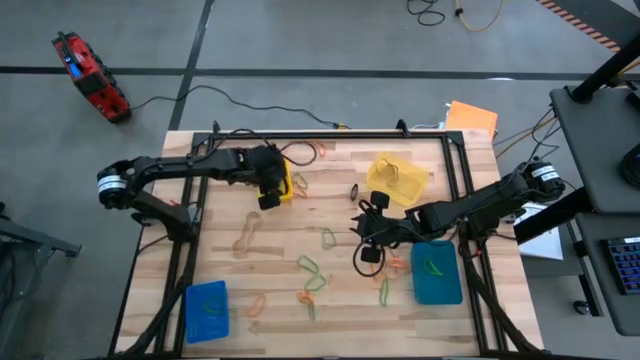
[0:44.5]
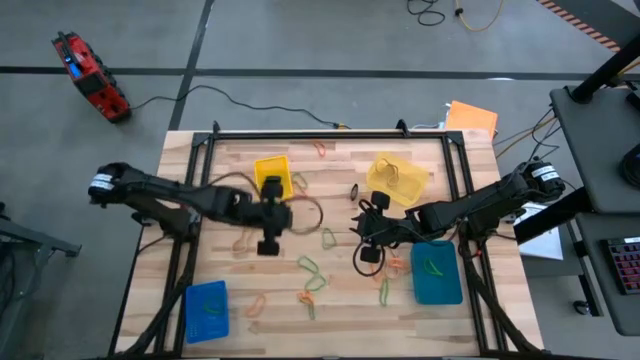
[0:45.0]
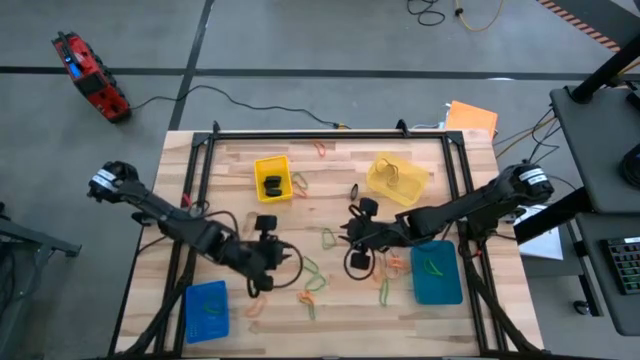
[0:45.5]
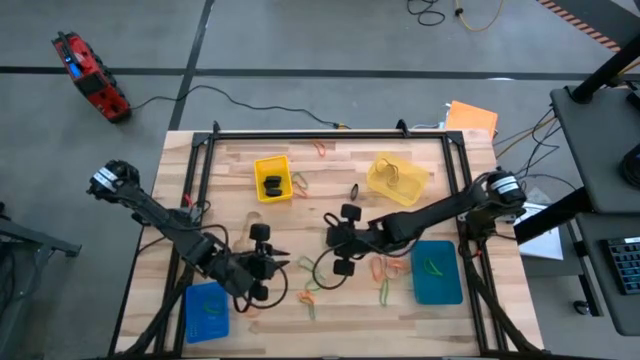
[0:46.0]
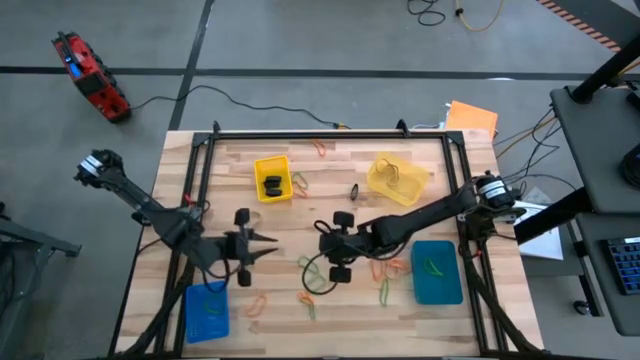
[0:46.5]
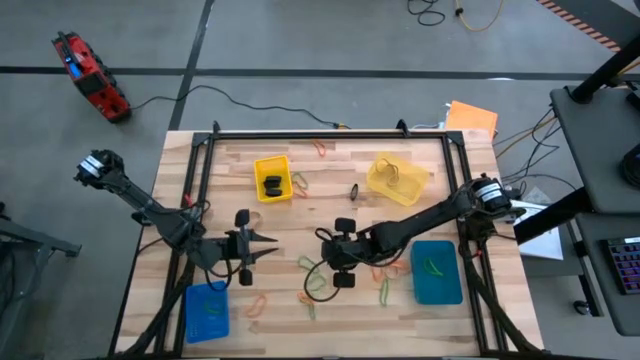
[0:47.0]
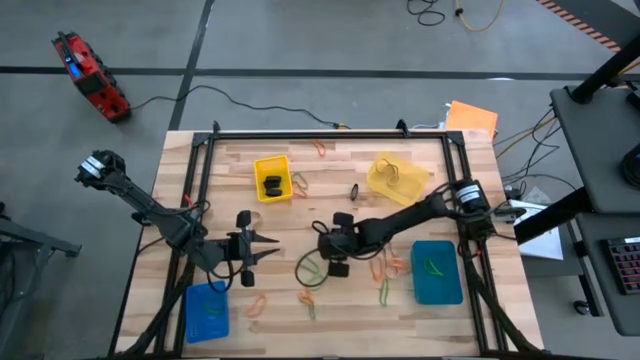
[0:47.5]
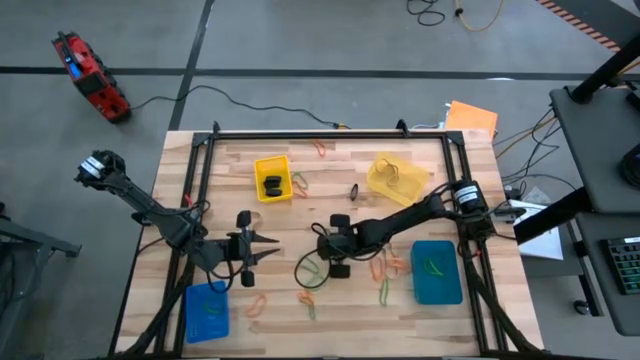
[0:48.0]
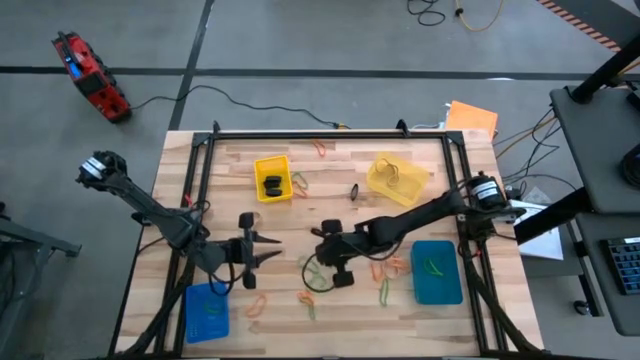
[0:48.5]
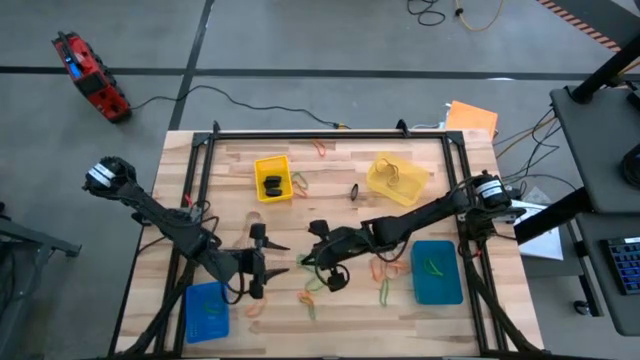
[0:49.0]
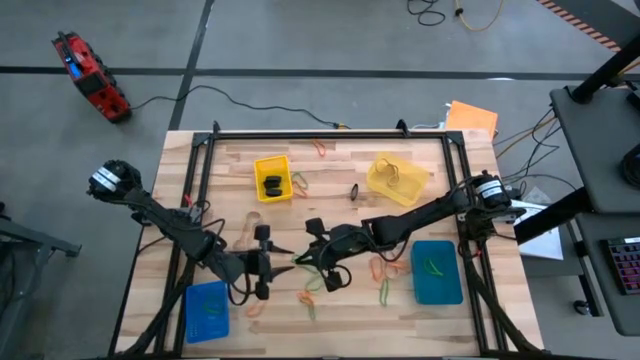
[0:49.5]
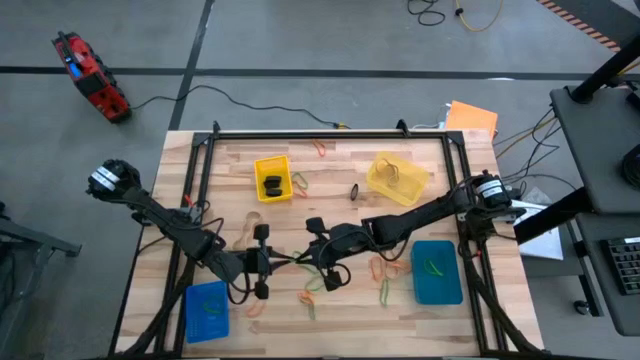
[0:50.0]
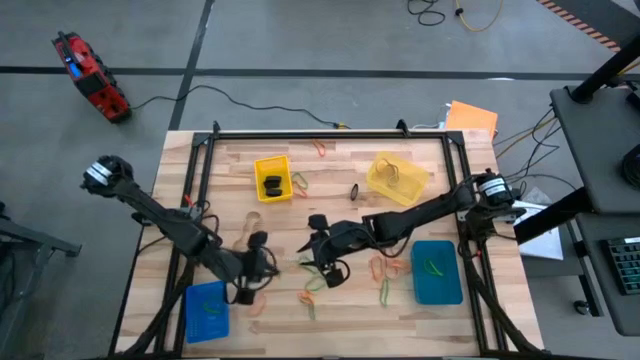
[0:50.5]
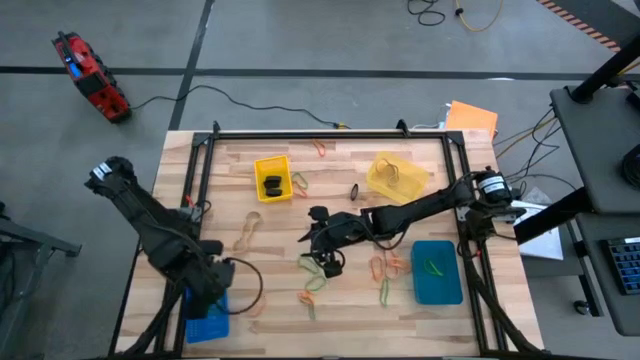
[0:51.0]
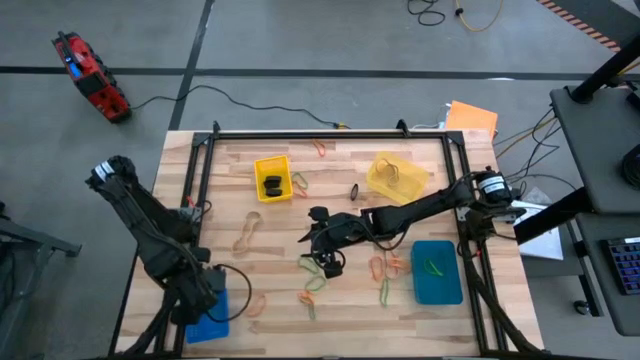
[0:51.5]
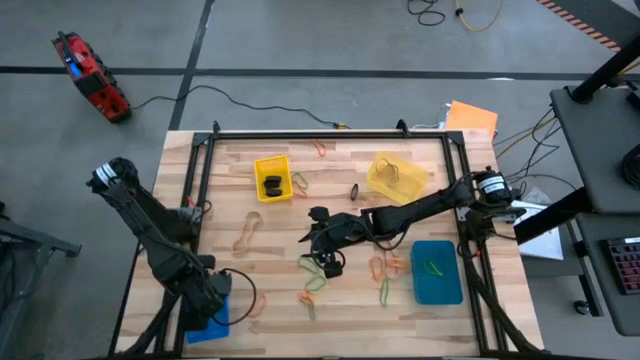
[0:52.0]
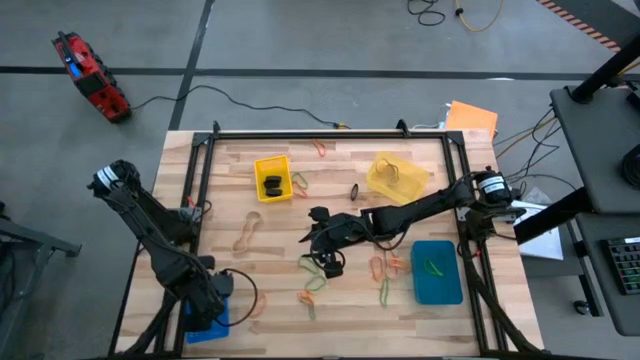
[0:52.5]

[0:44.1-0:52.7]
Task: Sort rubber bands into baskets
Put the green rubber band into the left blue bin

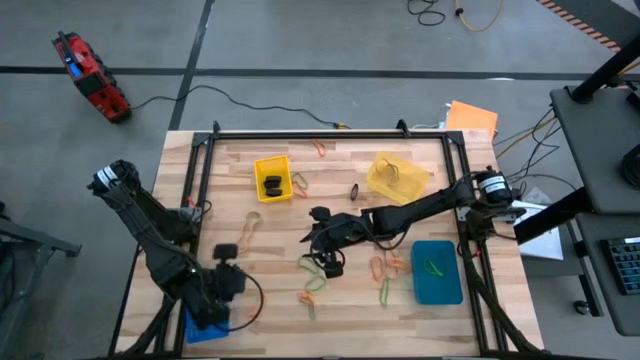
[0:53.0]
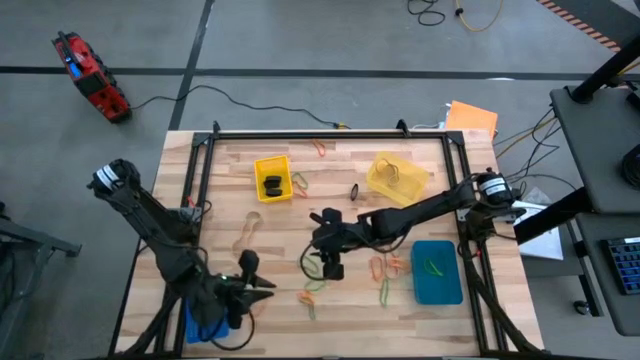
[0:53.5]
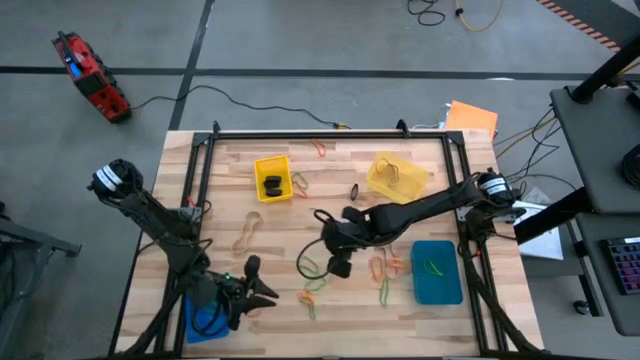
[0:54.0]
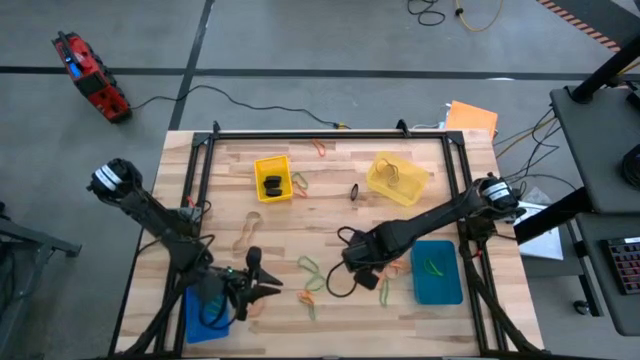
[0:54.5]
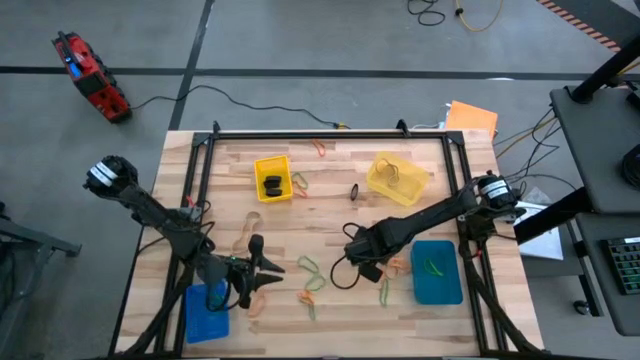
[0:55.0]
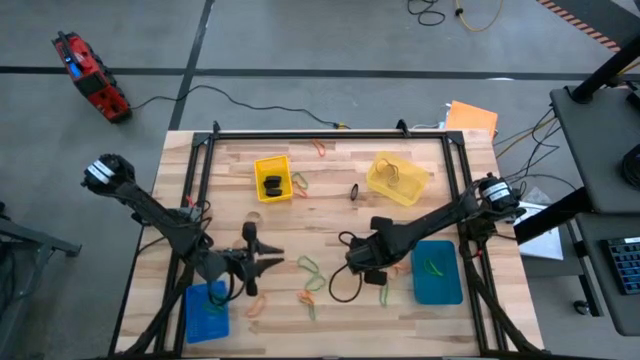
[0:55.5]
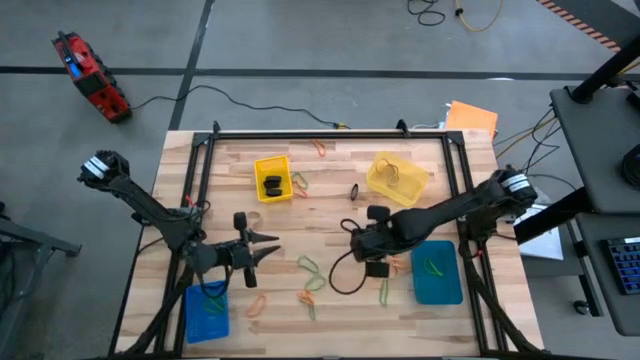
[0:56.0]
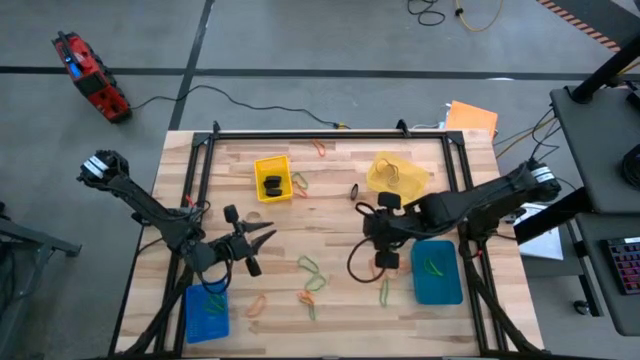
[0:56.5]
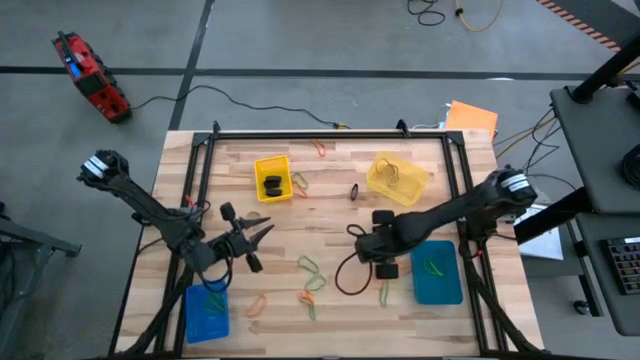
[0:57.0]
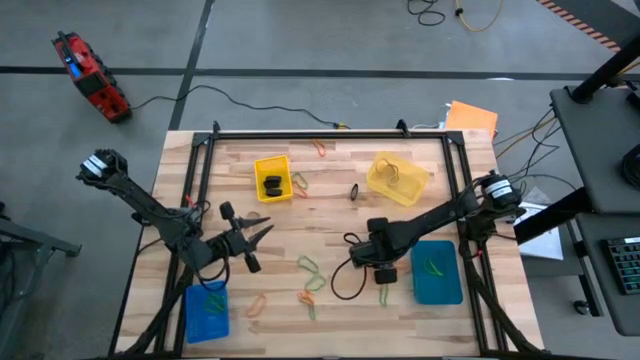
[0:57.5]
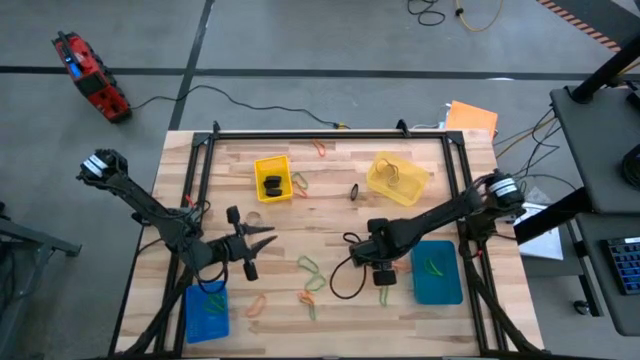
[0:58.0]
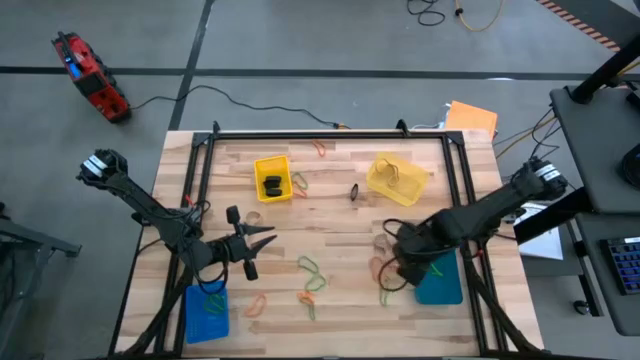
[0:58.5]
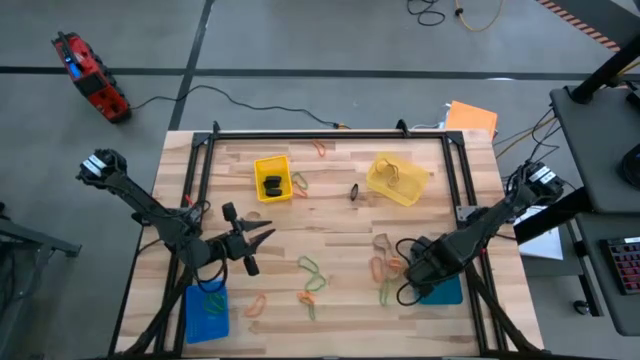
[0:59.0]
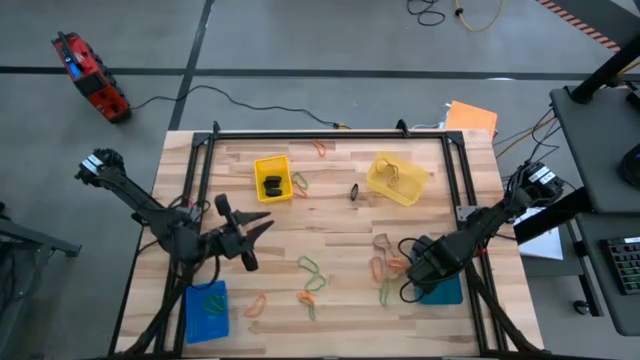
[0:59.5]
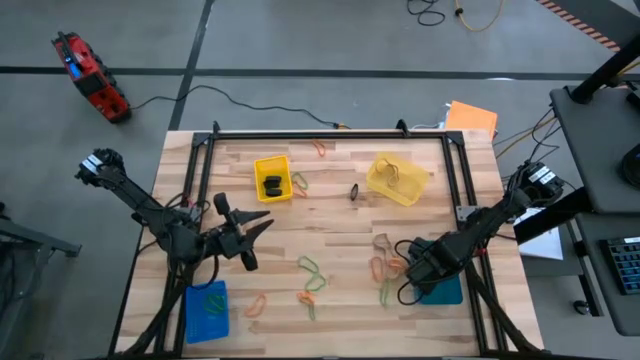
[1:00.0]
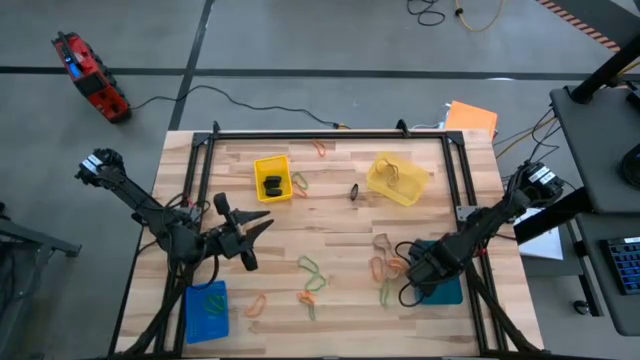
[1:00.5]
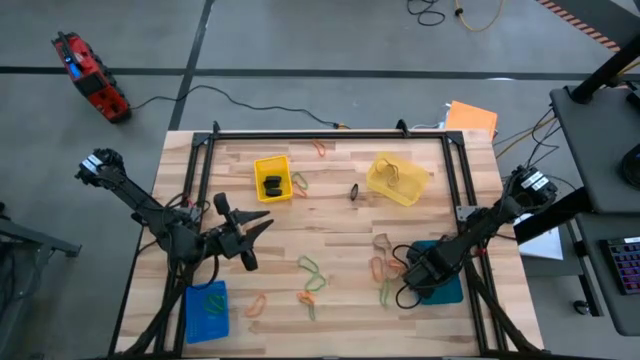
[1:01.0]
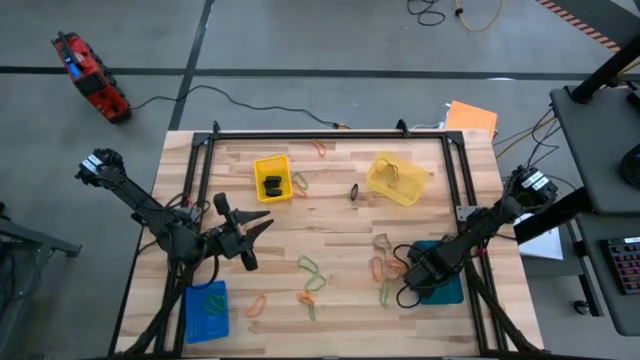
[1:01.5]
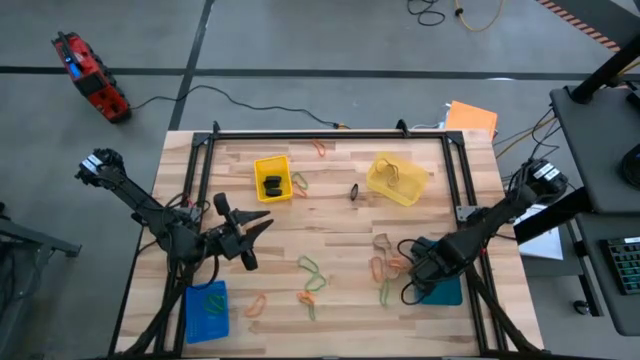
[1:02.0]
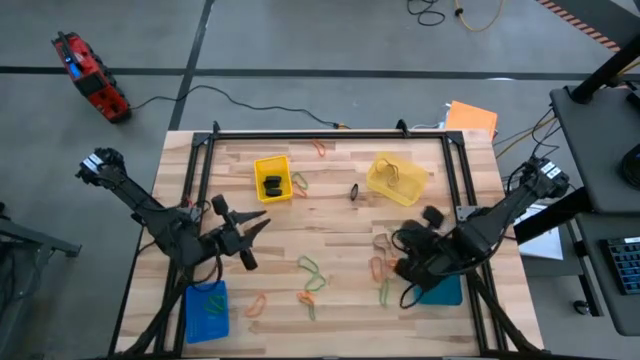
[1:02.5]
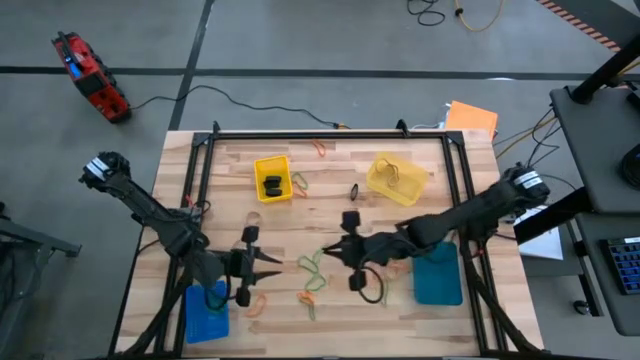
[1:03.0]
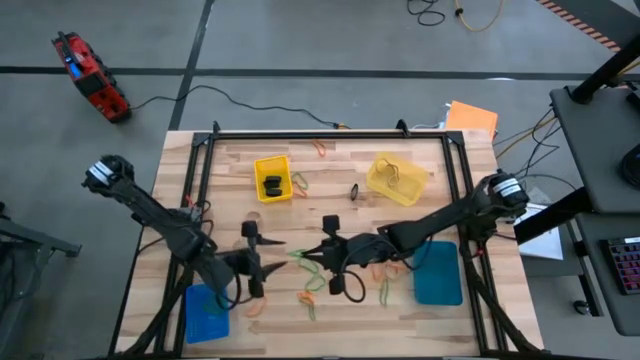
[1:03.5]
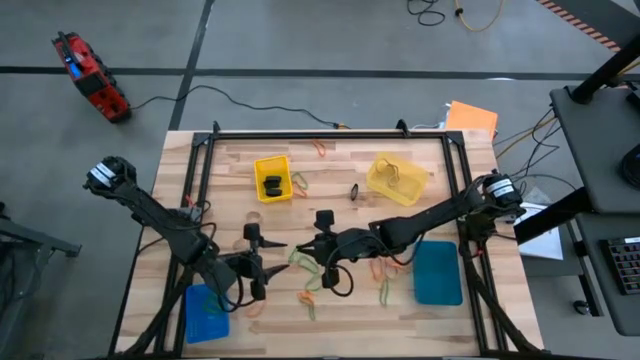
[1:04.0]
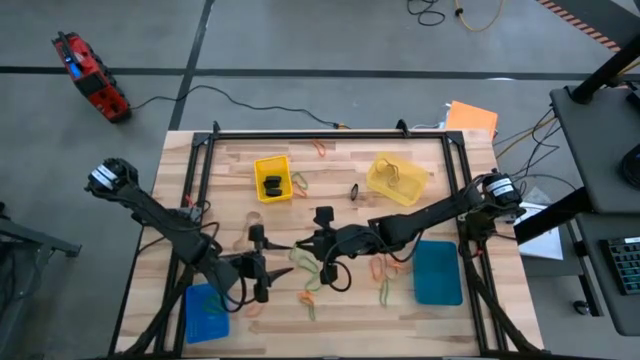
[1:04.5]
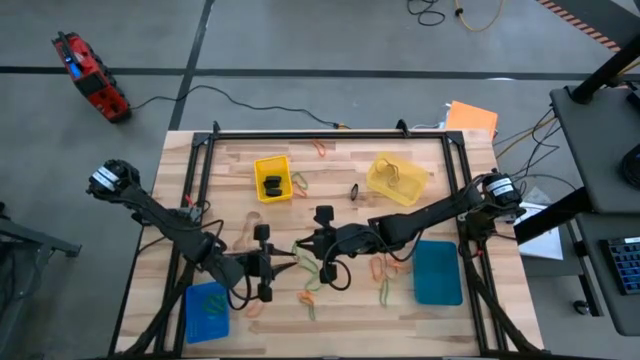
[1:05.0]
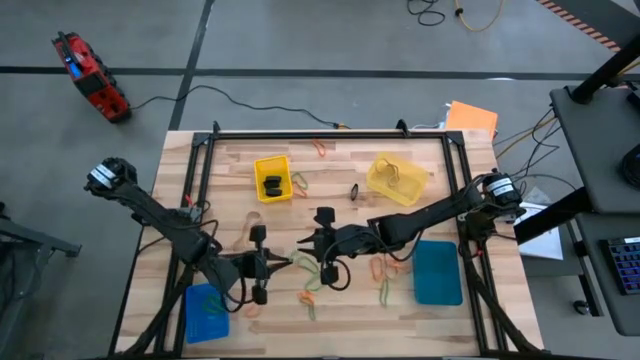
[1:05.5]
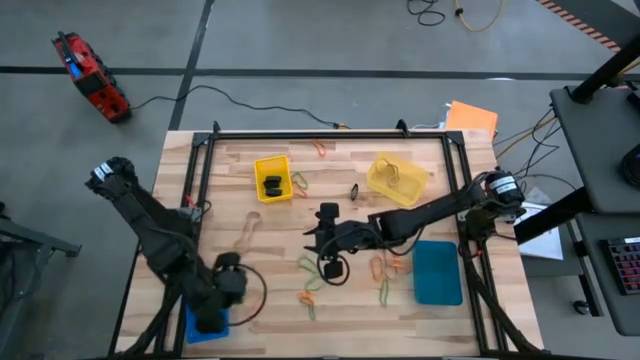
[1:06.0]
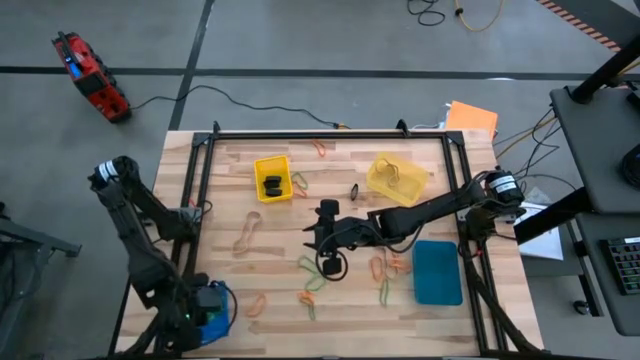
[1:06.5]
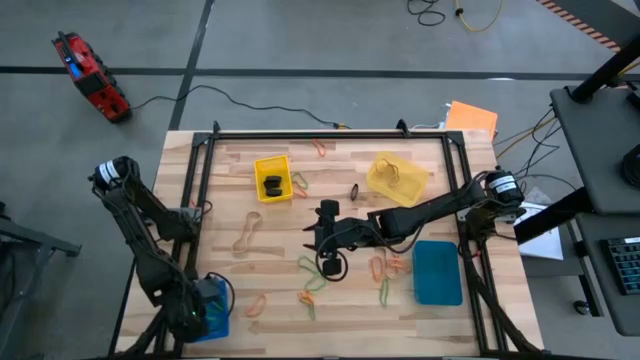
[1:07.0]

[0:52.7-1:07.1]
Put the green rubber band into the left blue bin
